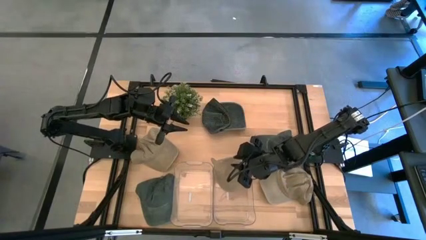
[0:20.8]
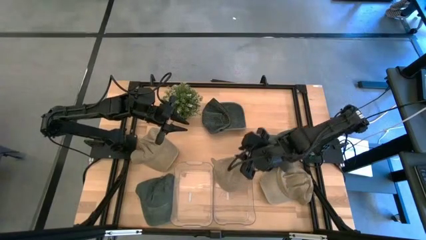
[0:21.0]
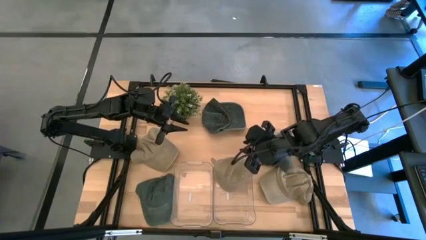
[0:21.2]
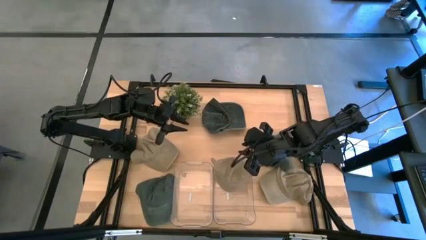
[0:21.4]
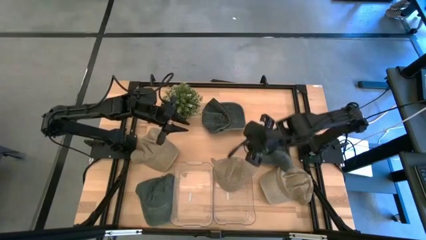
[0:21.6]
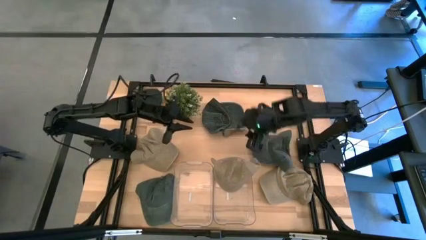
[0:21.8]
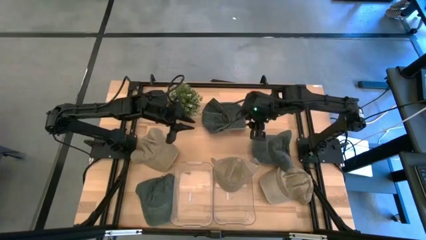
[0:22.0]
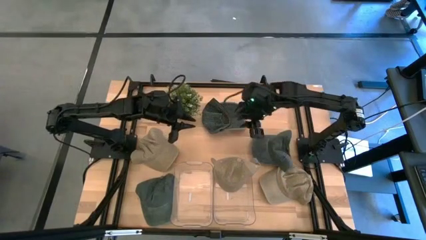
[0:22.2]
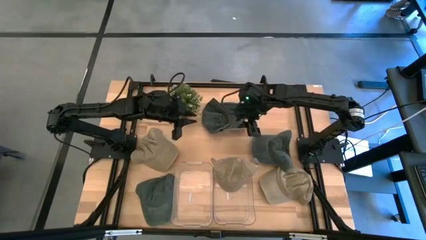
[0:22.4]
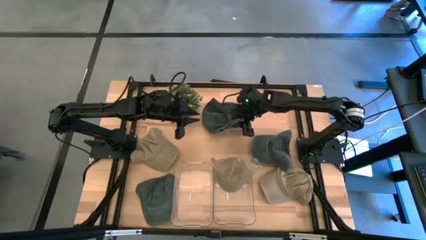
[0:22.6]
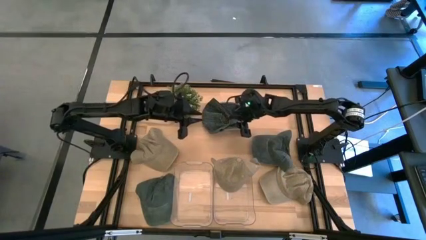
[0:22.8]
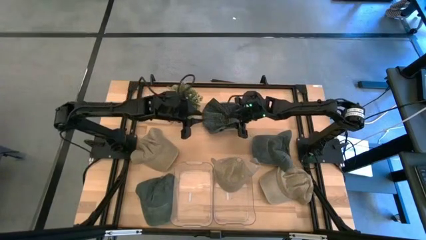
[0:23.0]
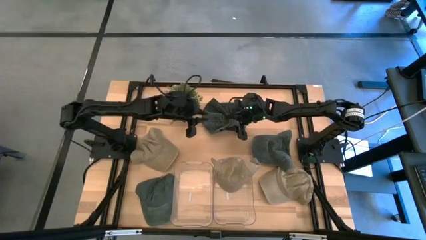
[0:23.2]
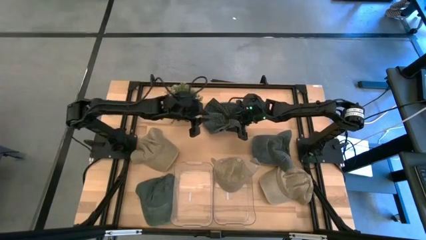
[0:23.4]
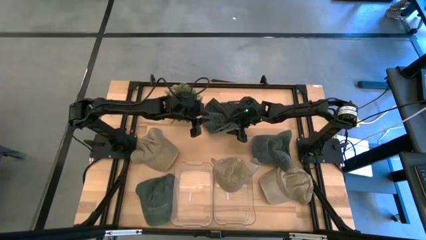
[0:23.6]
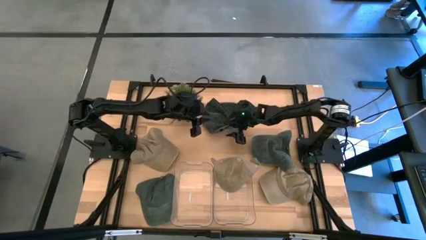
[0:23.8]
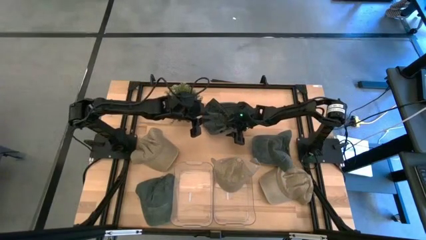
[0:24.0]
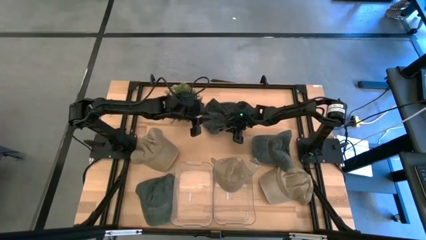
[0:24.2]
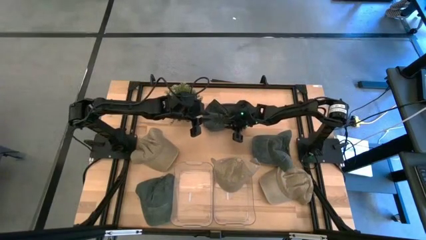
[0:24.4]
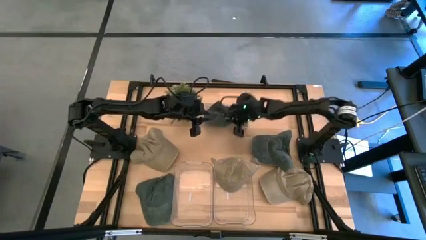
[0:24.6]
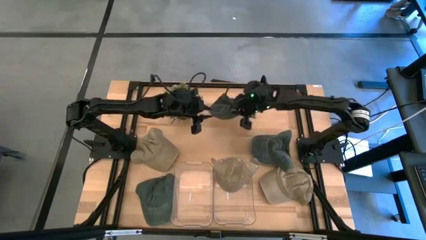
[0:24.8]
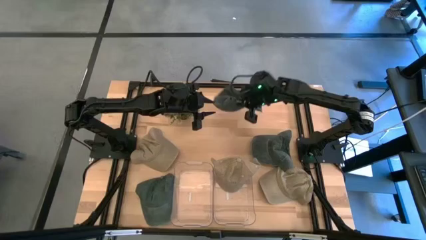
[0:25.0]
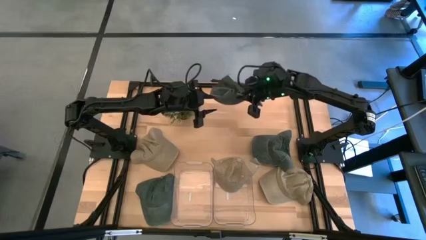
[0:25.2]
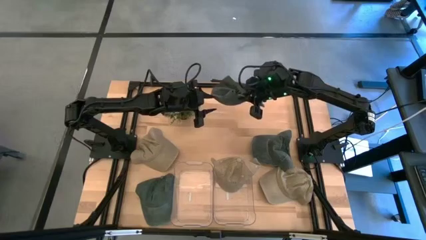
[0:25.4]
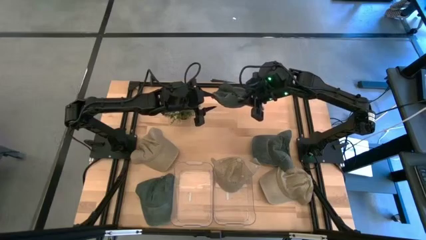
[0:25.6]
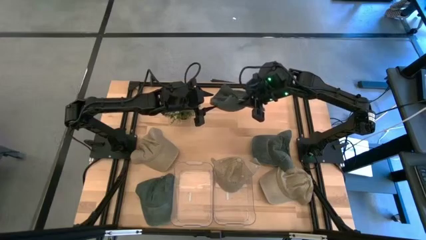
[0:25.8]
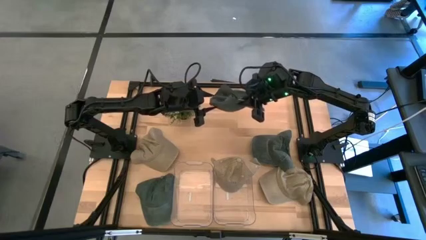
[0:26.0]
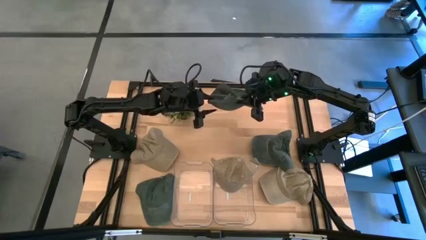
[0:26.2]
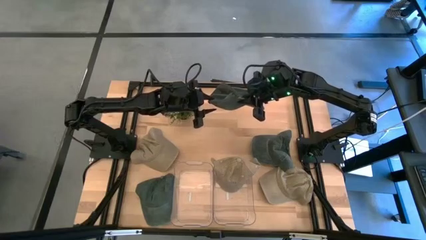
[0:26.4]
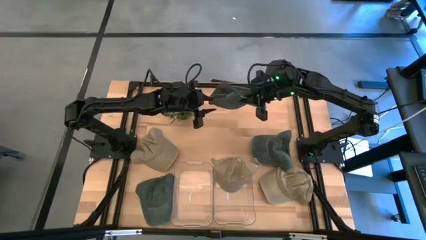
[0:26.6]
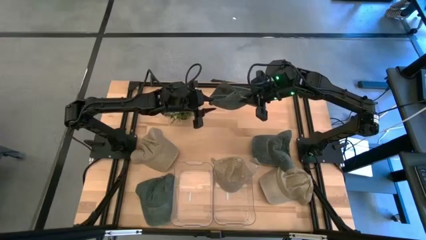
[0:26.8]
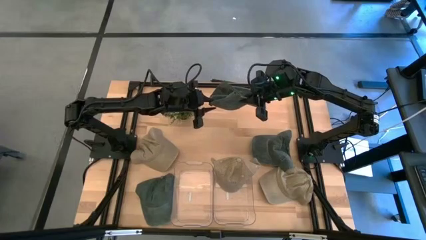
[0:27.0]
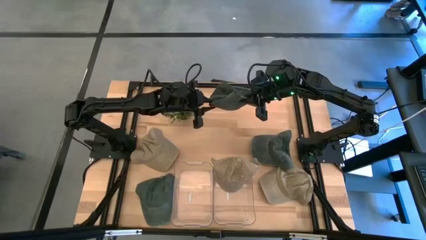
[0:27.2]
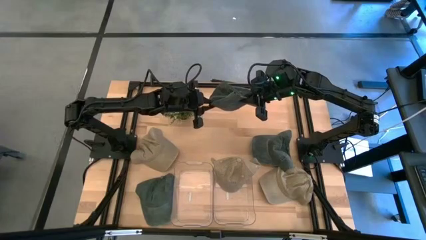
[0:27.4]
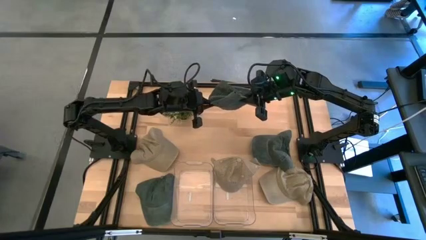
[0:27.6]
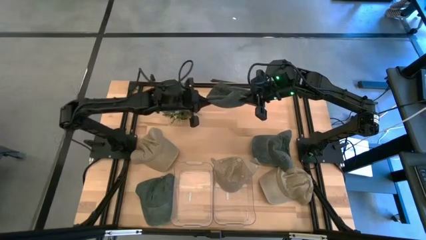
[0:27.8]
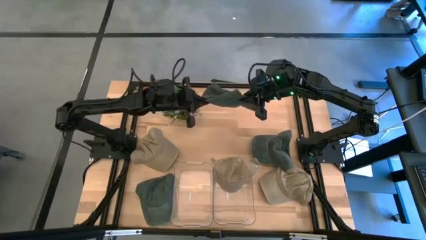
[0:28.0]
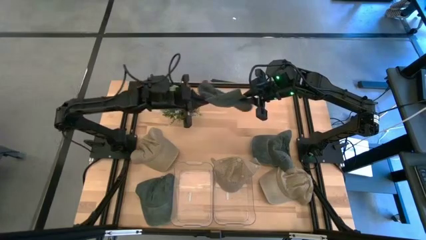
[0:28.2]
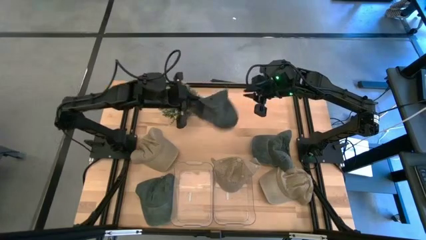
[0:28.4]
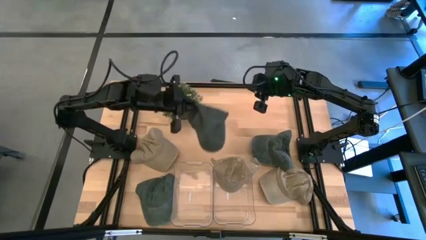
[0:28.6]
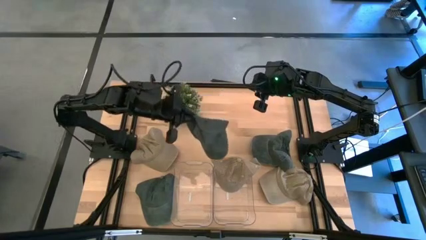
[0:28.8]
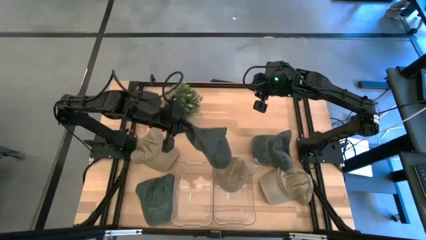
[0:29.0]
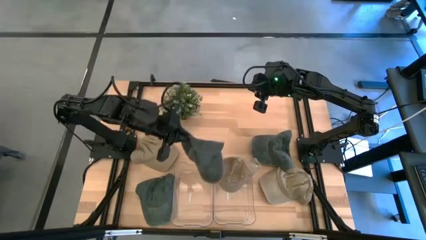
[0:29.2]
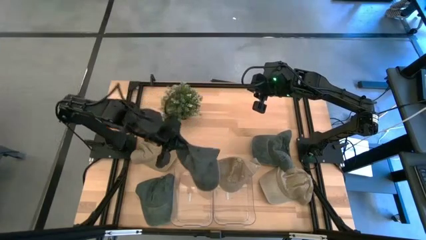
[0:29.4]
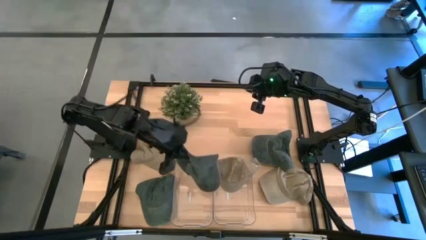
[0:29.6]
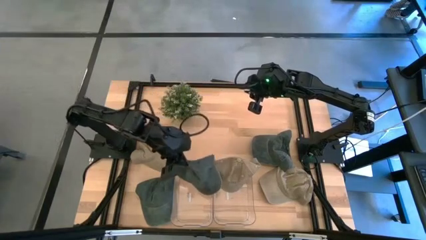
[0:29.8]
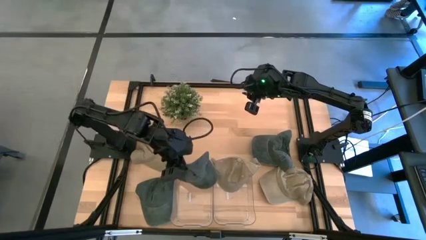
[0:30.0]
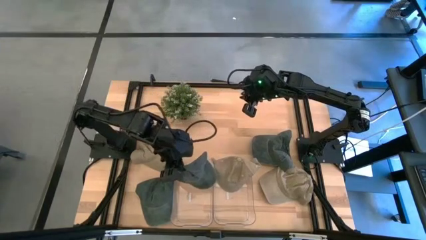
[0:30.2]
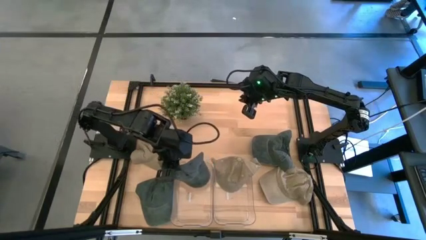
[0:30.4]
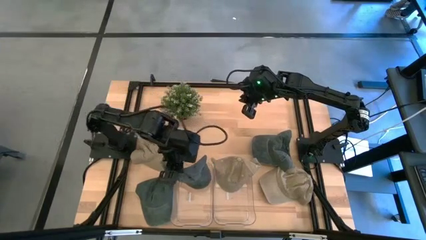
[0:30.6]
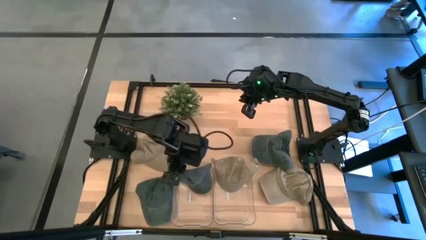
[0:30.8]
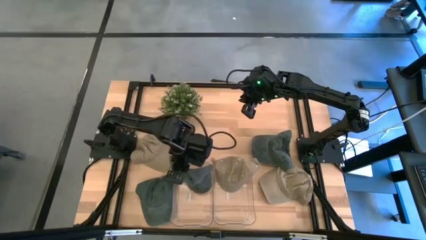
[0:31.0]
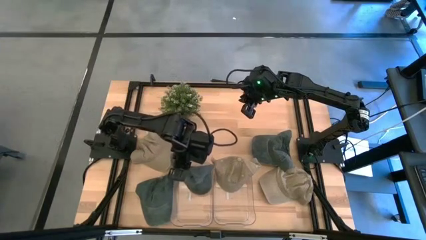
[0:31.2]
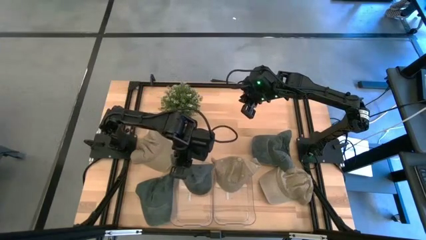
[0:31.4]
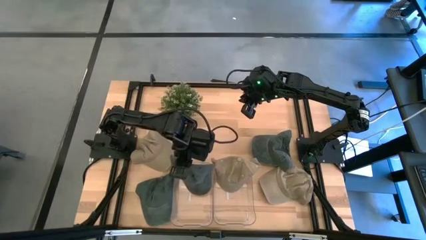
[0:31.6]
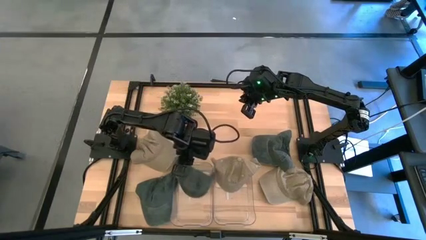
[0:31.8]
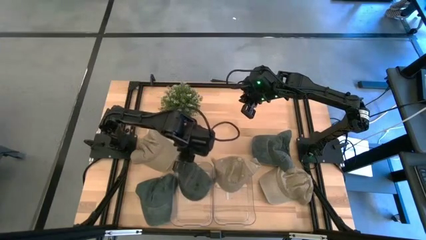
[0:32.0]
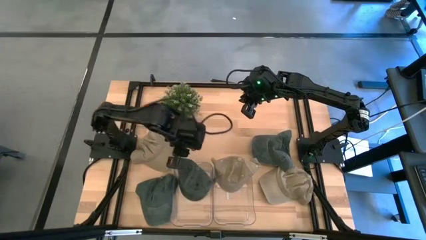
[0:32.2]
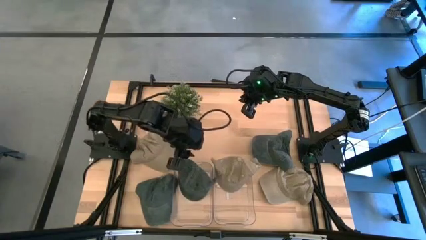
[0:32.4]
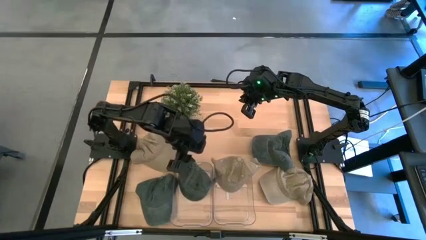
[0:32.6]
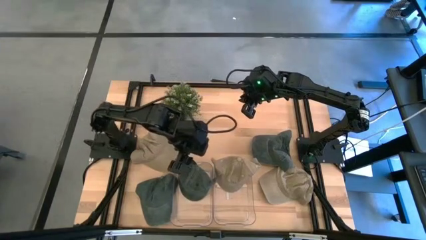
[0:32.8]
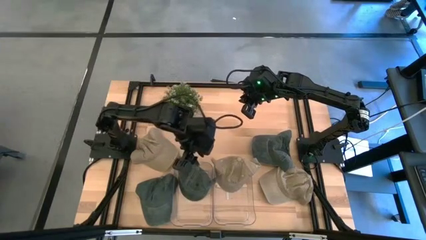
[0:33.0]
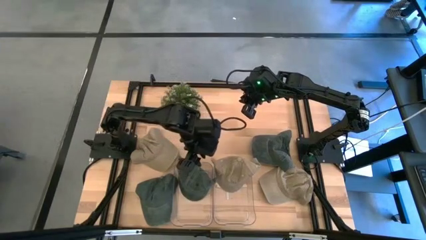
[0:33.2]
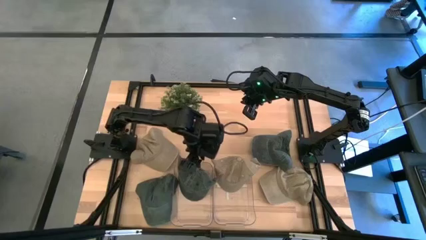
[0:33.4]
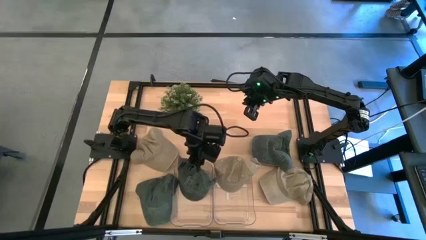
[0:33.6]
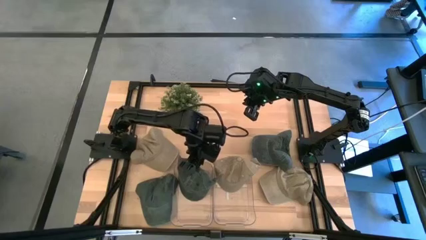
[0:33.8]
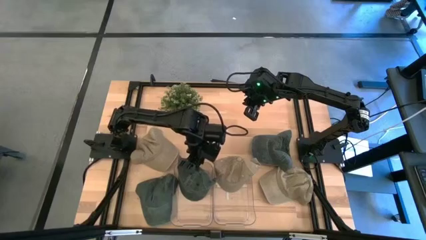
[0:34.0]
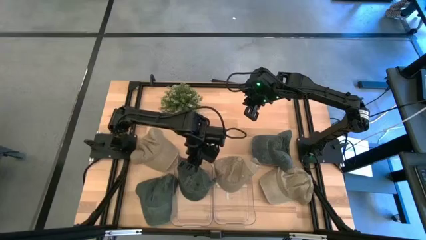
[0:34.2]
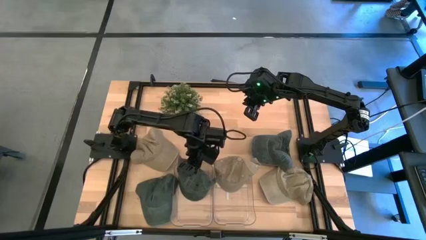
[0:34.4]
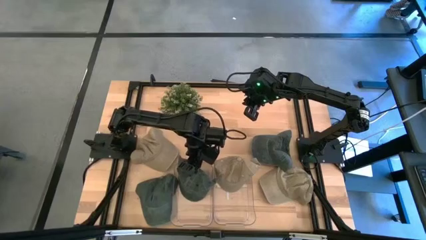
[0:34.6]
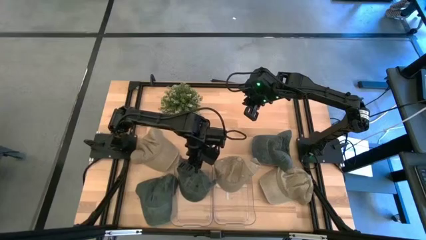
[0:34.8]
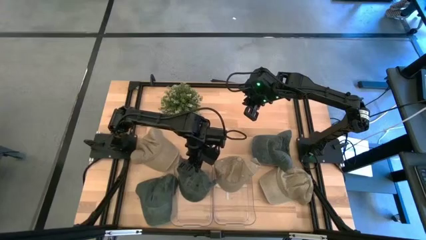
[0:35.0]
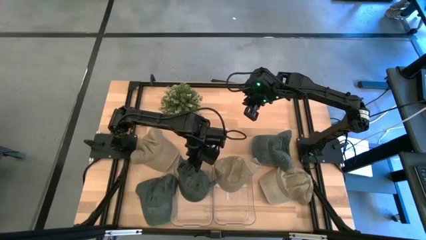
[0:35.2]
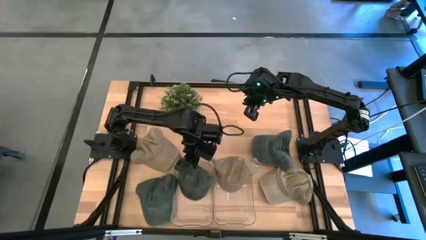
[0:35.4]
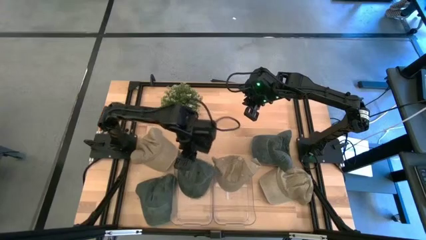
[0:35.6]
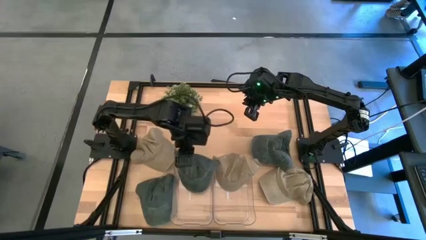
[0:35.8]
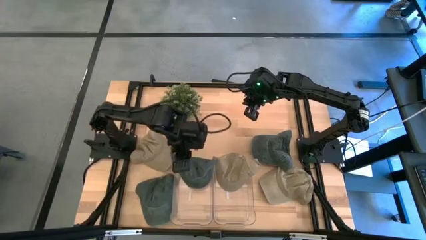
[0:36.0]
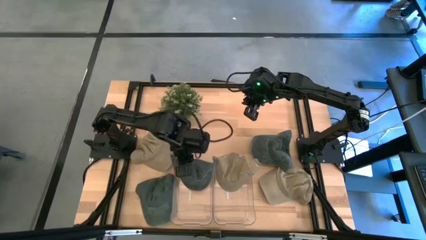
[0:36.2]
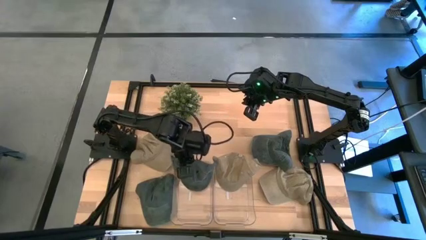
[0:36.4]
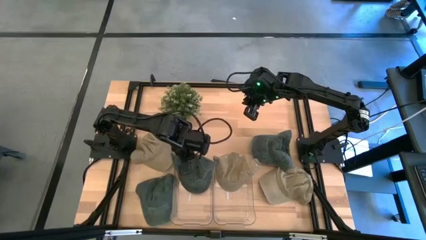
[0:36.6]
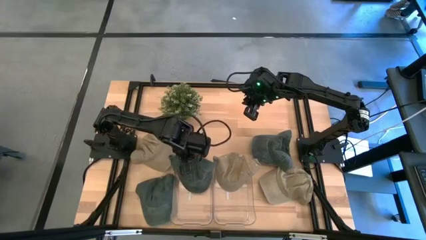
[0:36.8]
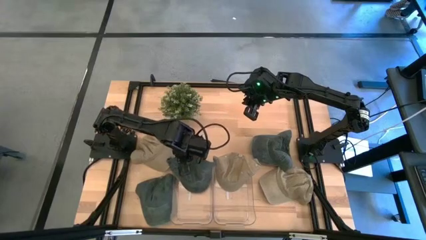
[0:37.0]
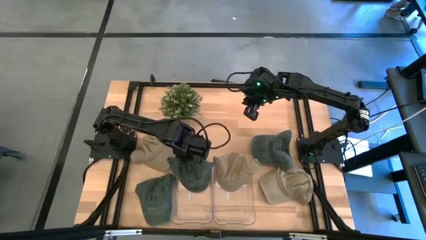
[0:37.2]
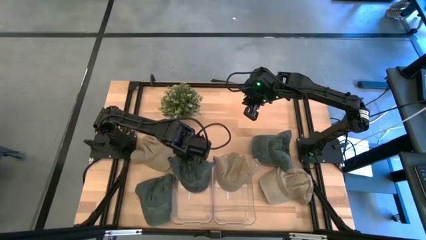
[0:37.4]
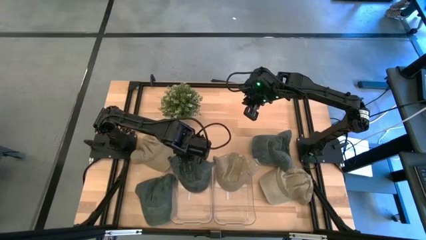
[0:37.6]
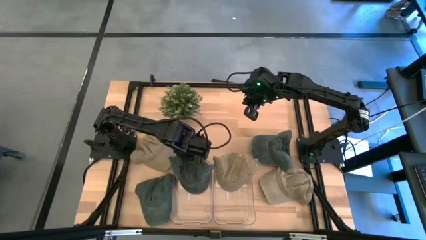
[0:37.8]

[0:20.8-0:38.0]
Task: Pick & Place hat
Put the top black cap into the left transparent bin
